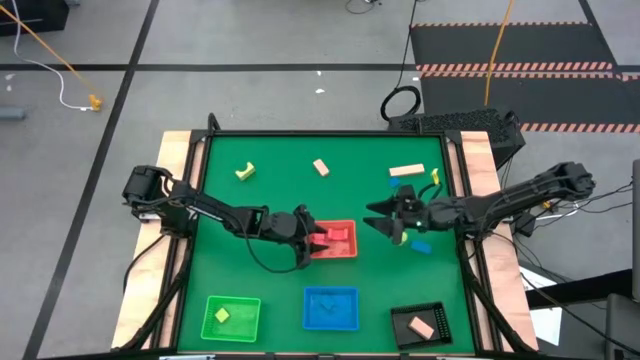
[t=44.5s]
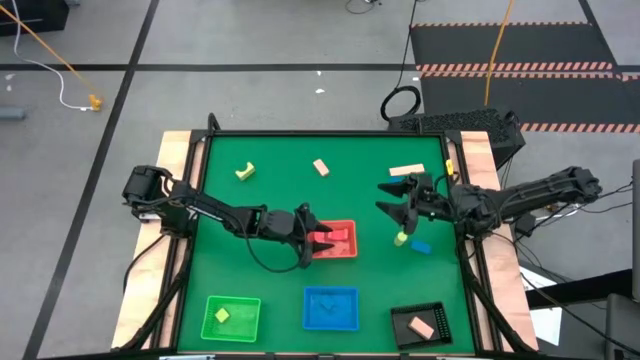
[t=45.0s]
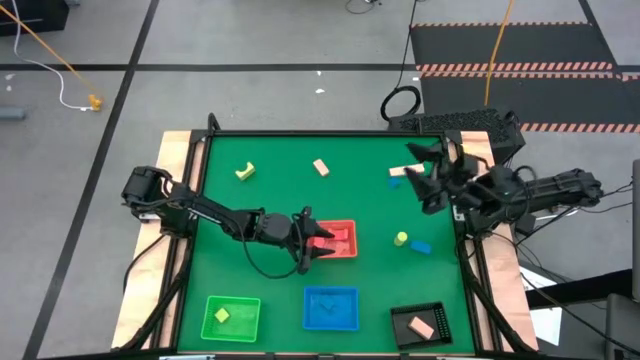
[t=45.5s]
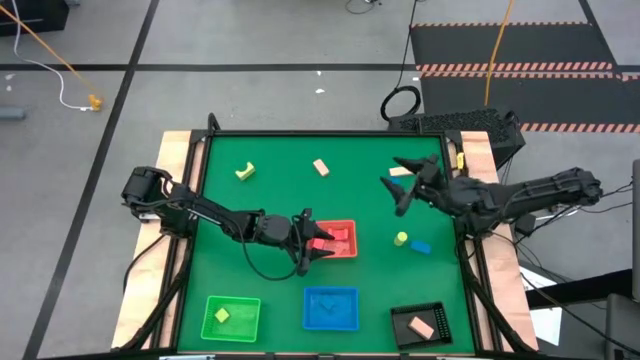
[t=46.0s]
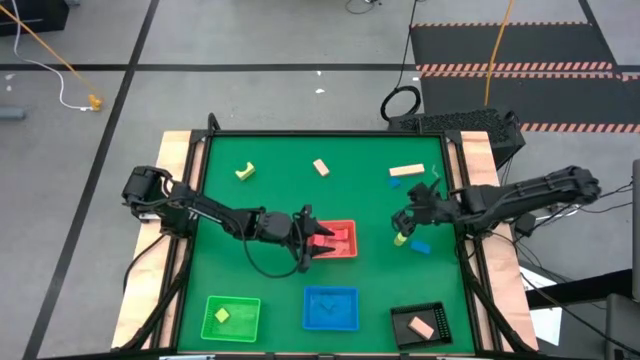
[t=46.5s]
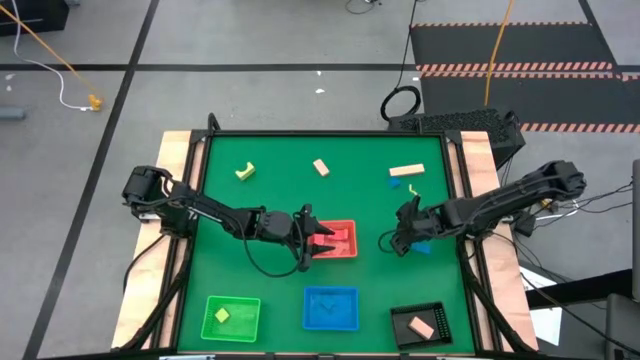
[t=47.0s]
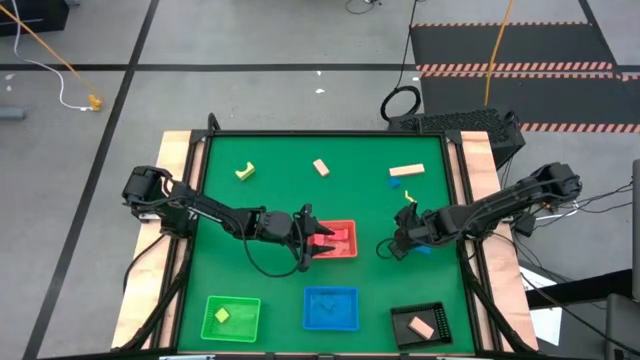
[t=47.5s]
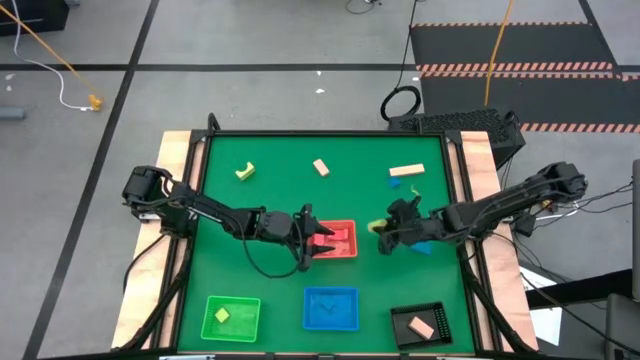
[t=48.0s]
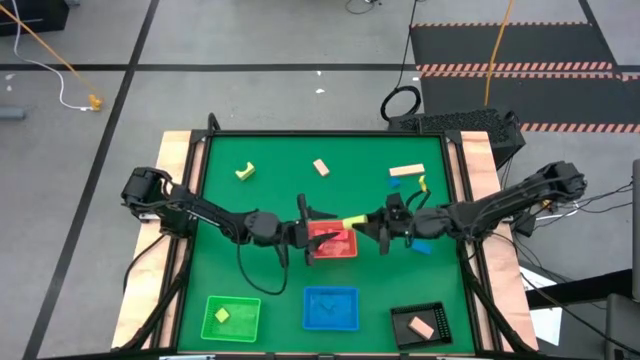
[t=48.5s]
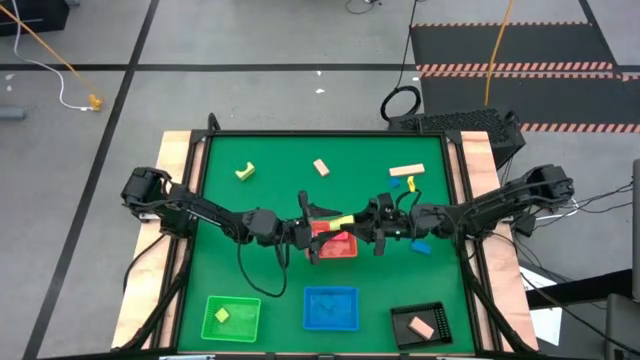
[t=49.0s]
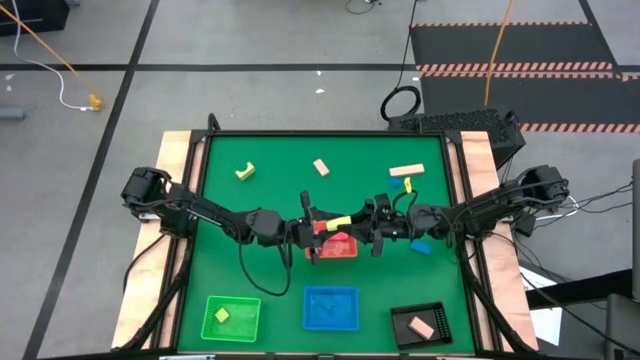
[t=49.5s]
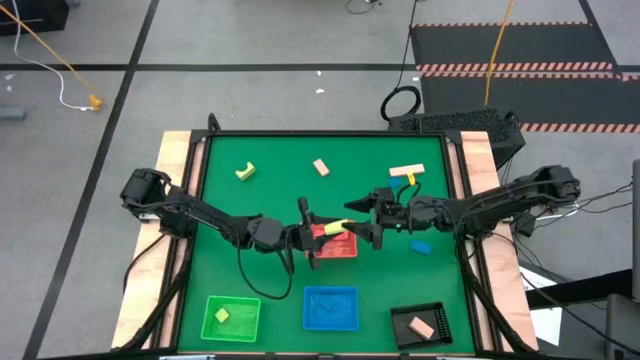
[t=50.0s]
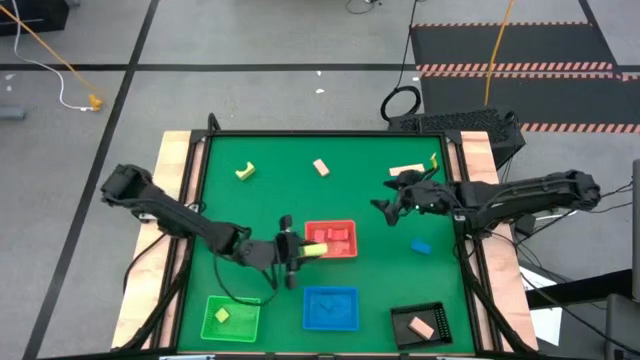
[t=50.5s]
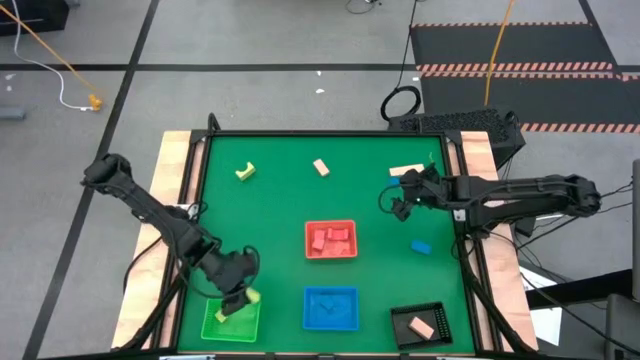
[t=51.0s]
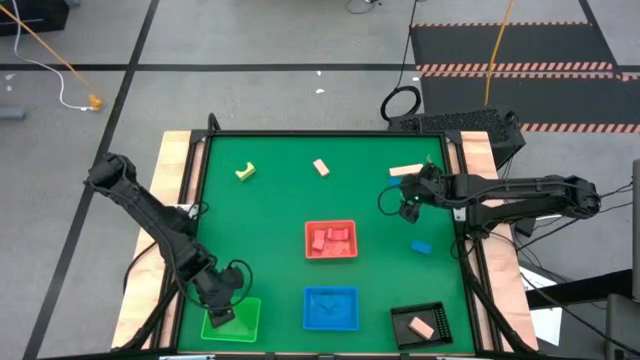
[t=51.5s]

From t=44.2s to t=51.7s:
Task: Sort & place blocks by color
Put the bottom green block into the green bin

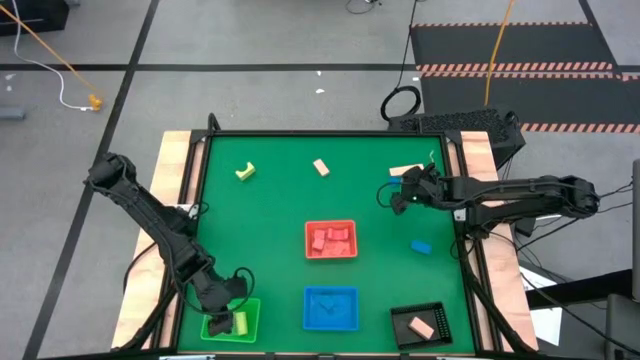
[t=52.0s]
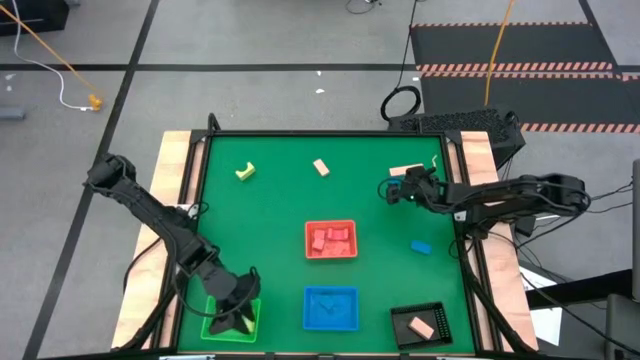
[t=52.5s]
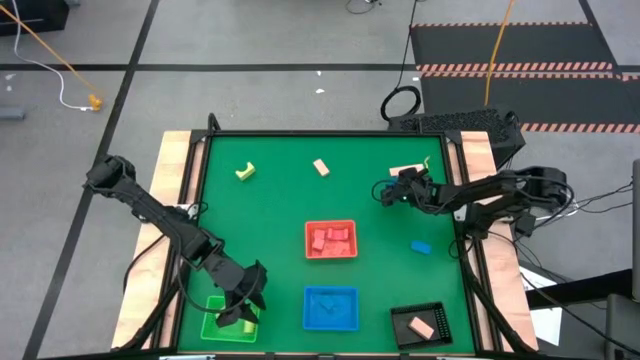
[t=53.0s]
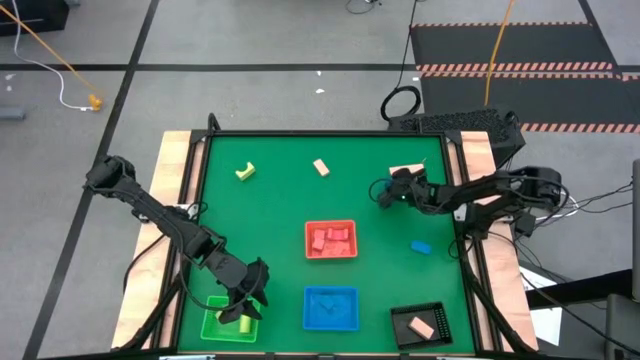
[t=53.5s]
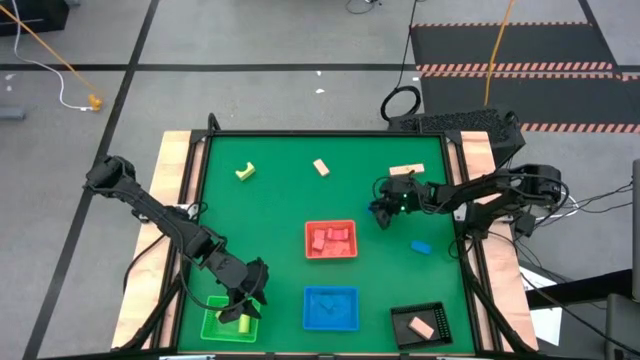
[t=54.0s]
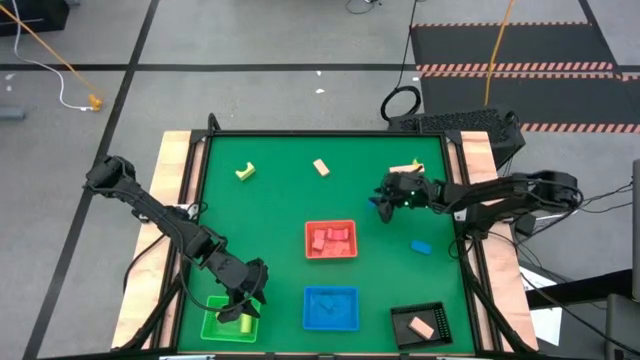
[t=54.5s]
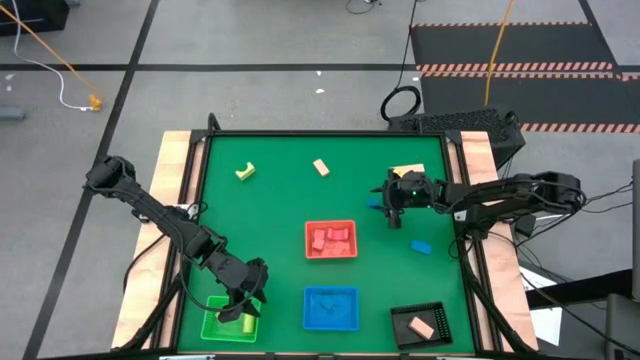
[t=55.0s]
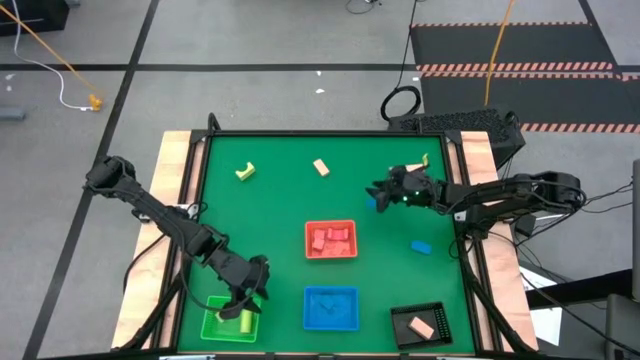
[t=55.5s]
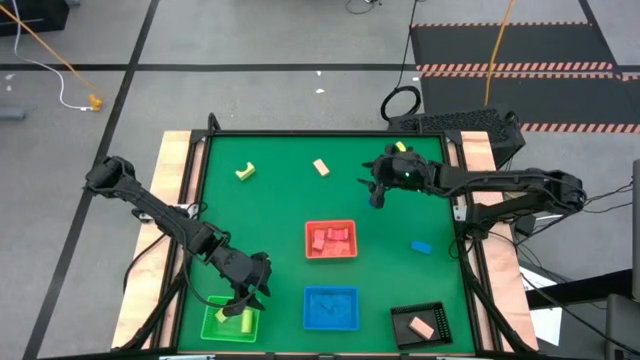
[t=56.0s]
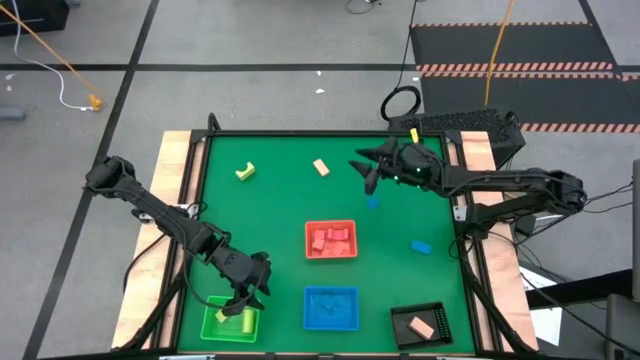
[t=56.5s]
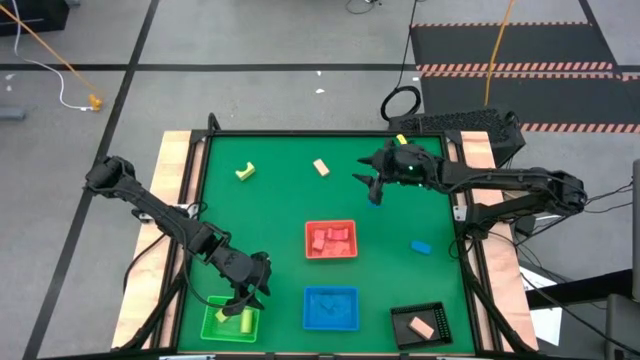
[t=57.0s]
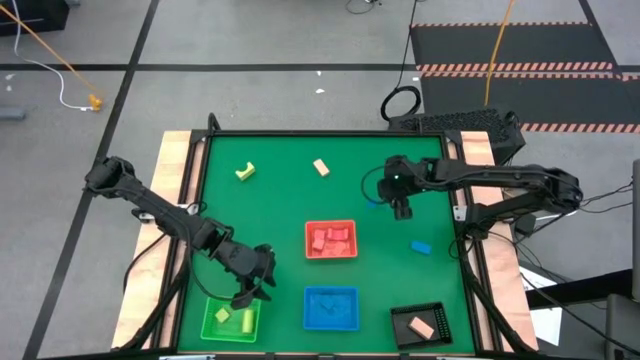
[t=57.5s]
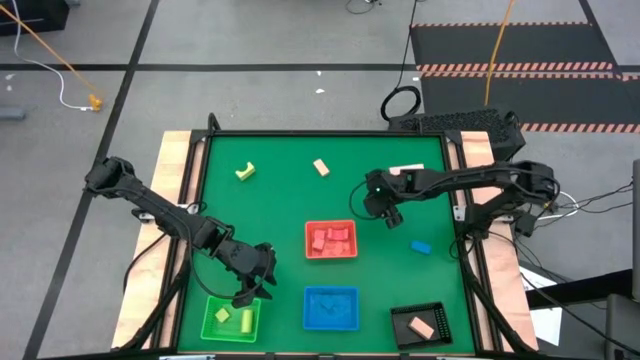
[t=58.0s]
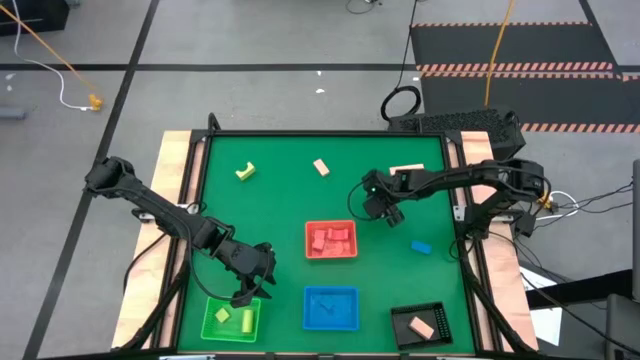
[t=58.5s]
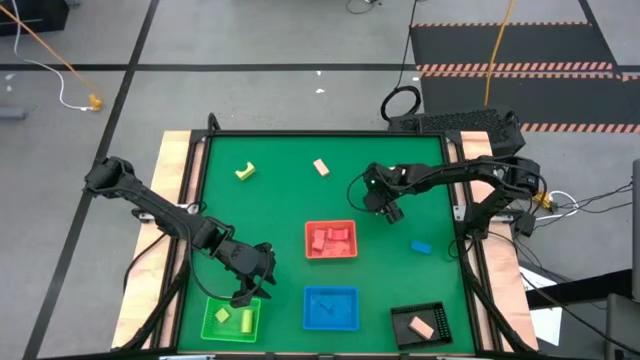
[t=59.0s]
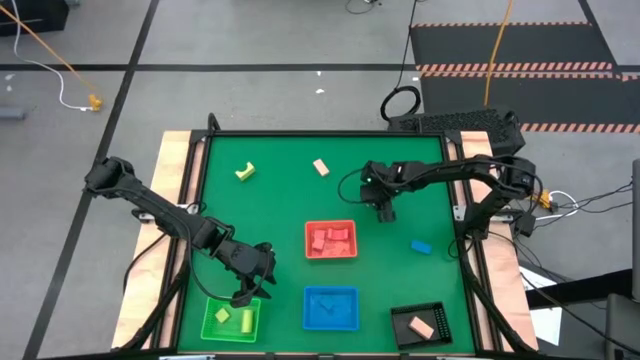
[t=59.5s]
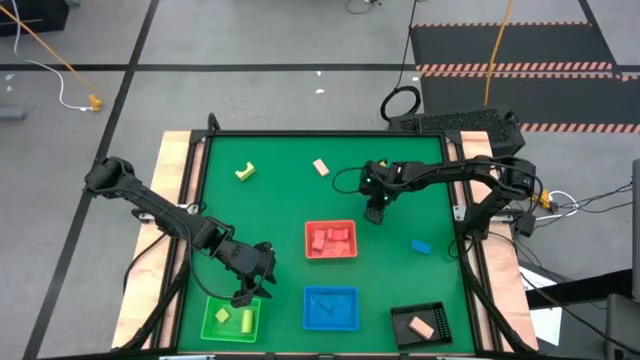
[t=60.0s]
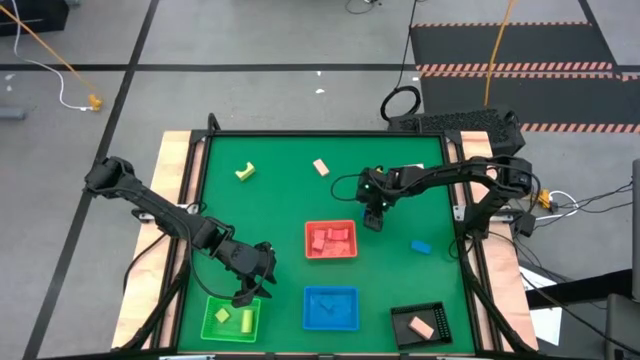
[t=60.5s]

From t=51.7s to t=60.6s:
Put the top blue block into the blue bin

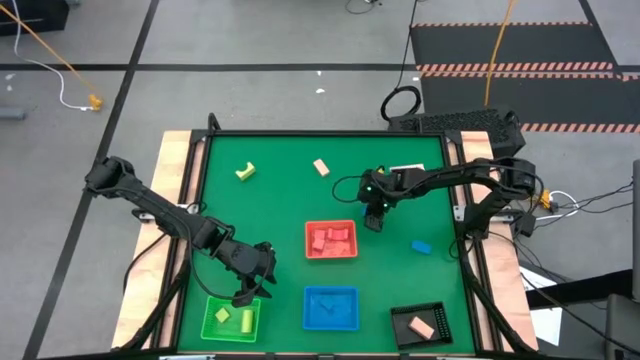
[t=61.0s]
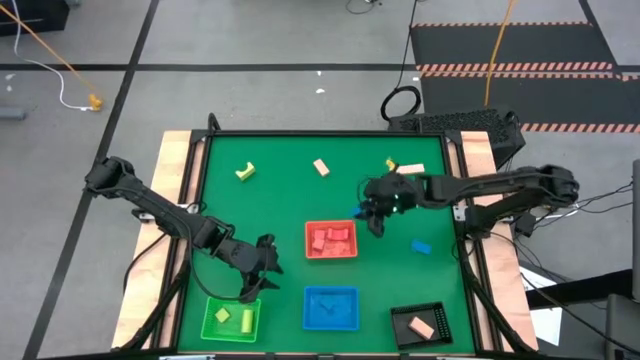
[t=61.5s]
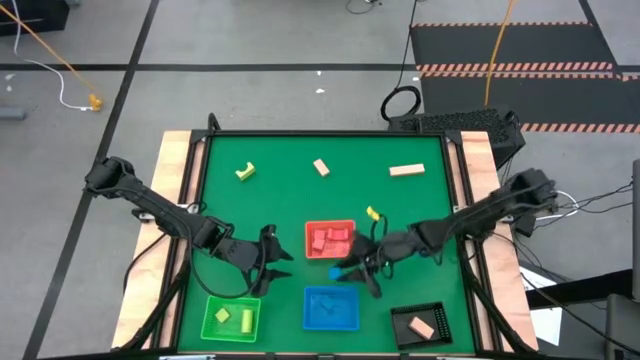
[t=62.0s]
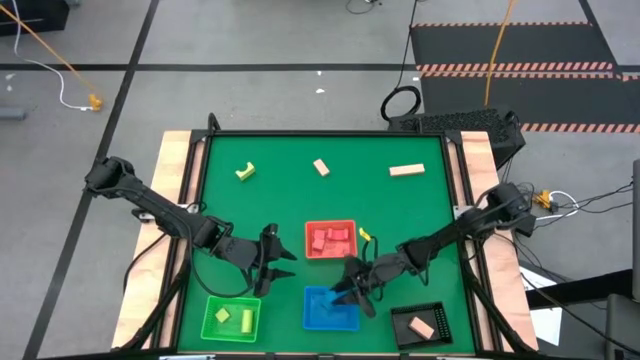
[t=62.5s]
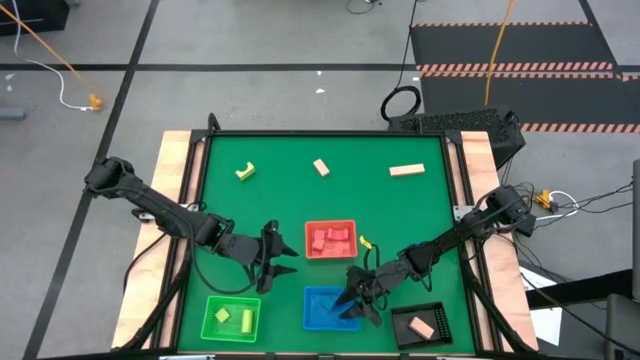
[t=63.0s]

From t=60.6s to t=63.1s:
Put the top blue block into the blue bin

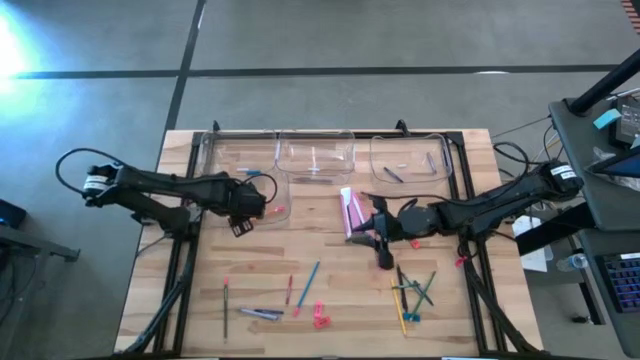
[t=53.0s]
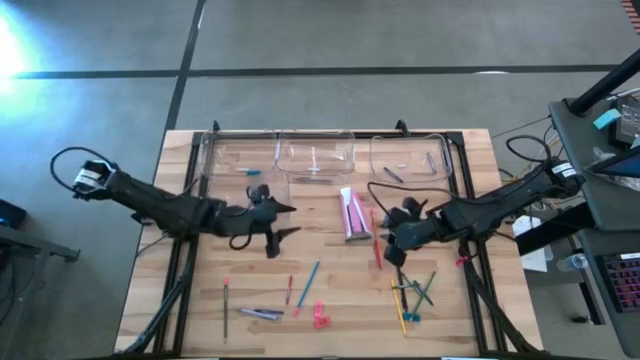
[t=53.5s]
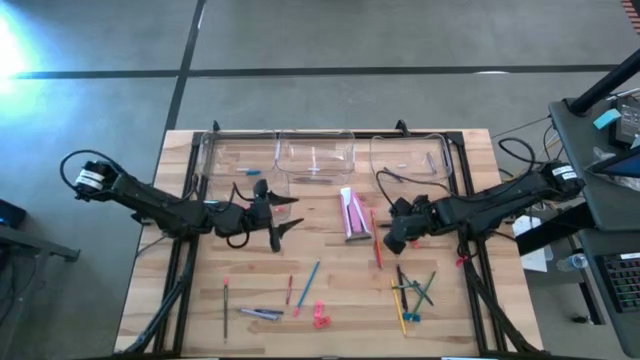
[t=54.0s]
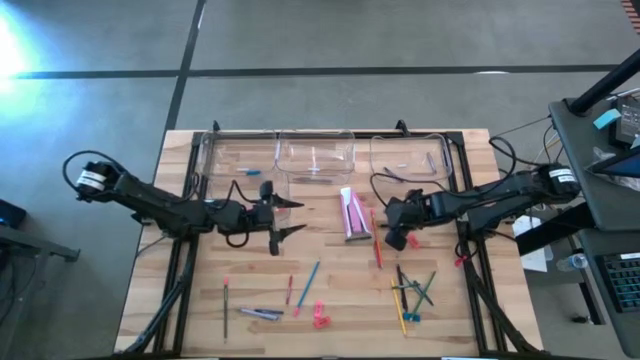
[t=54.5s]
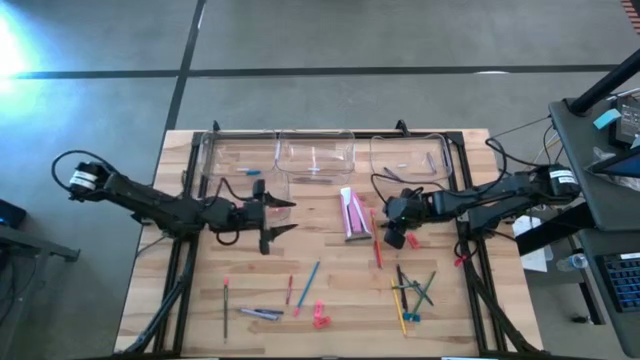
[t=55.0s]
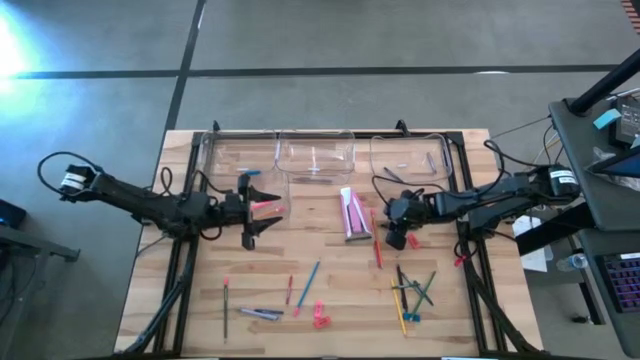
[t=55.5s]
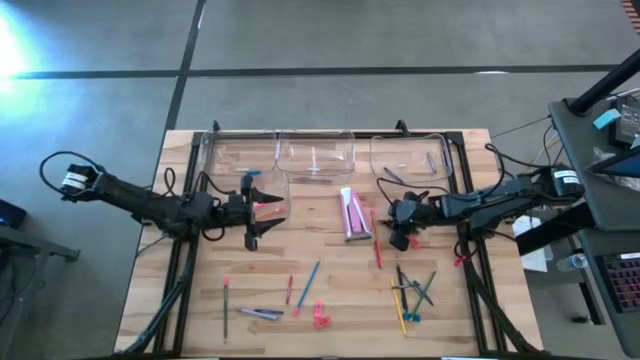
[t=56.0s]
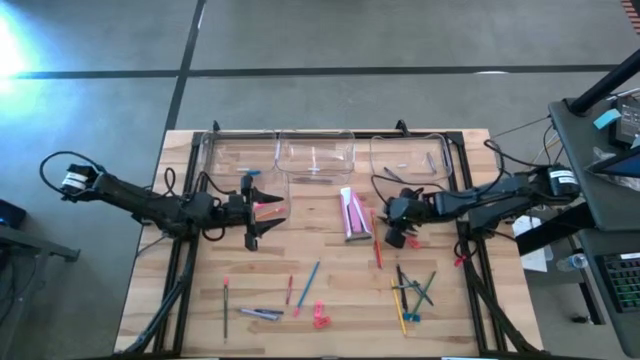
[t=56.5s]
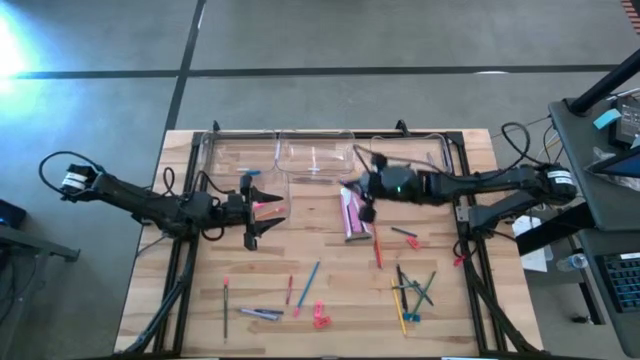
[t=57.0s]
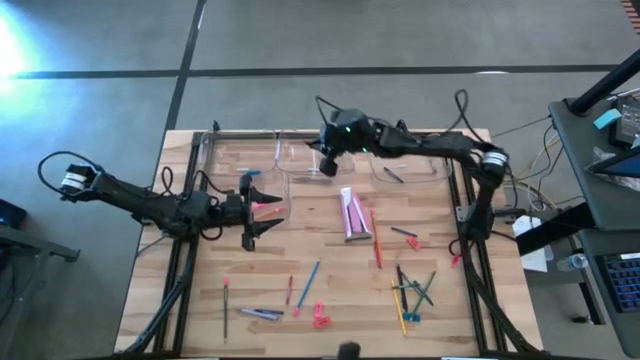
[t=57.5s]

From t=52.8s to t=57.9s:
Task: Sort crayons/erasers/pens/pencils in bins
Put the black pen into the top middle transparent bin
